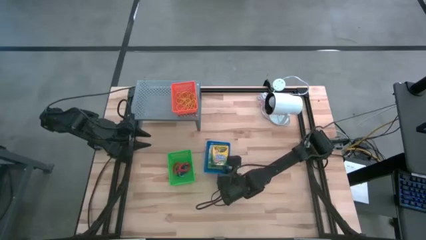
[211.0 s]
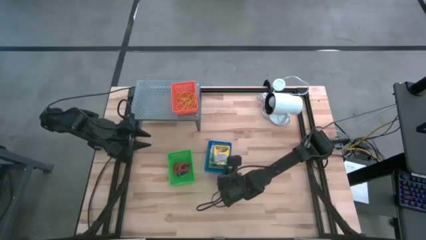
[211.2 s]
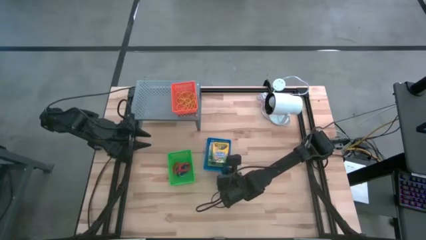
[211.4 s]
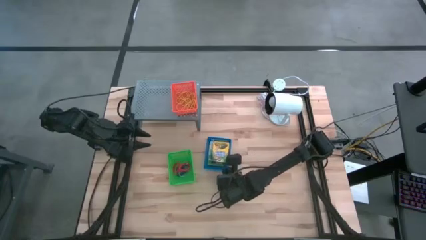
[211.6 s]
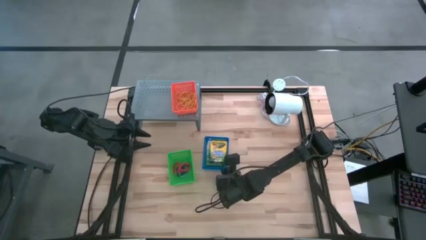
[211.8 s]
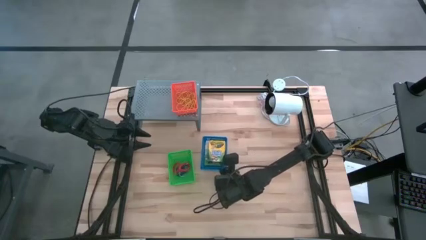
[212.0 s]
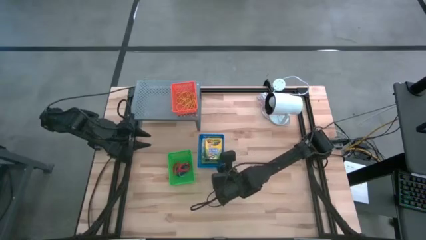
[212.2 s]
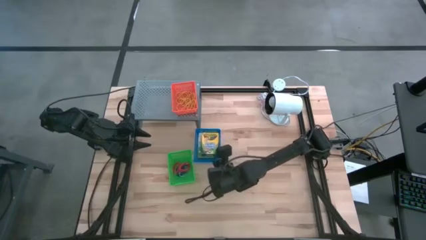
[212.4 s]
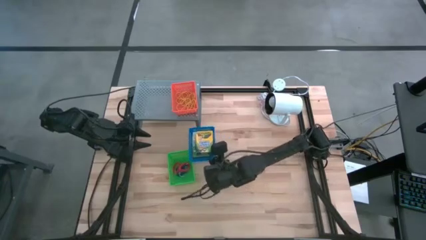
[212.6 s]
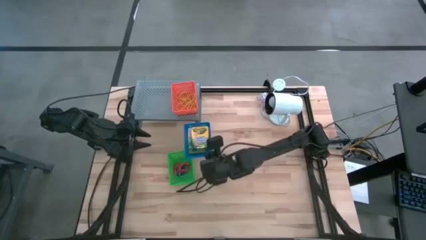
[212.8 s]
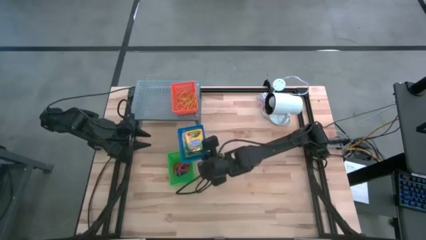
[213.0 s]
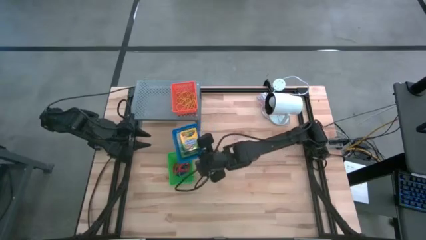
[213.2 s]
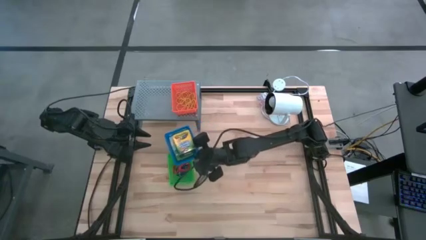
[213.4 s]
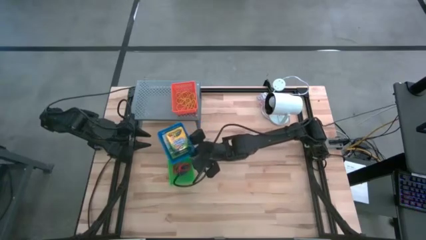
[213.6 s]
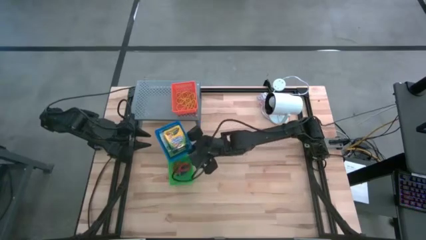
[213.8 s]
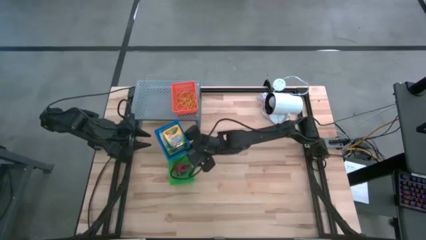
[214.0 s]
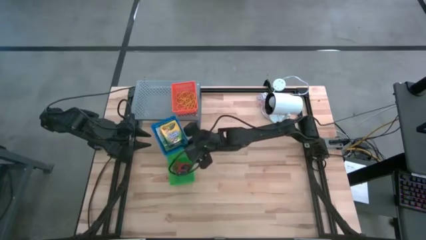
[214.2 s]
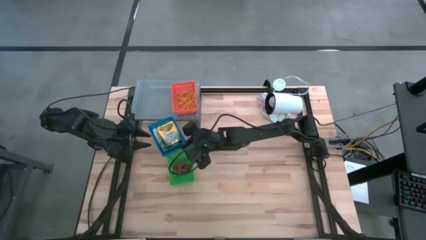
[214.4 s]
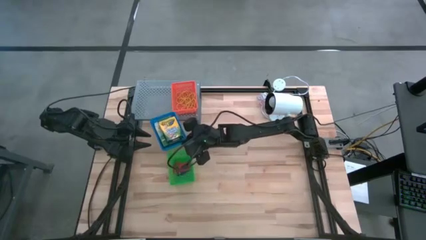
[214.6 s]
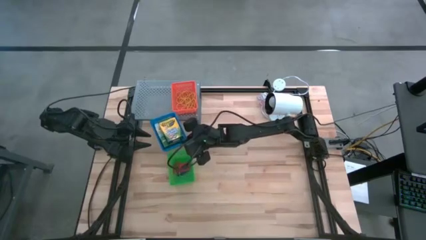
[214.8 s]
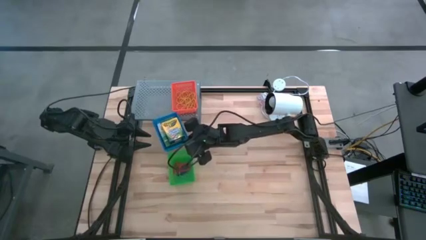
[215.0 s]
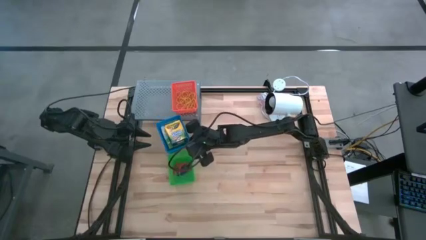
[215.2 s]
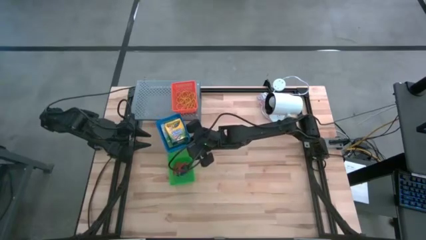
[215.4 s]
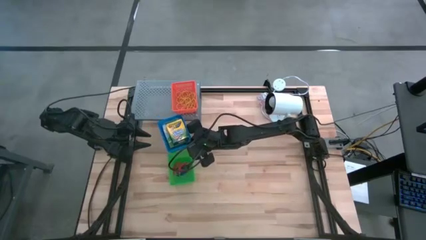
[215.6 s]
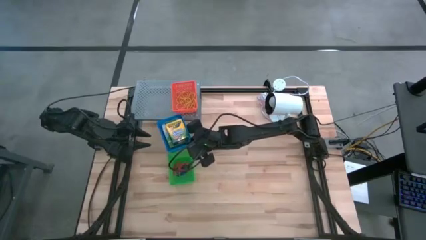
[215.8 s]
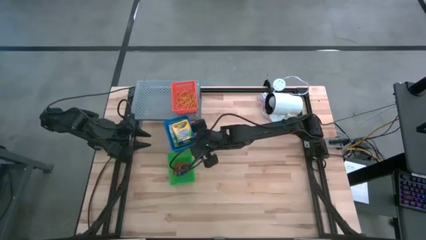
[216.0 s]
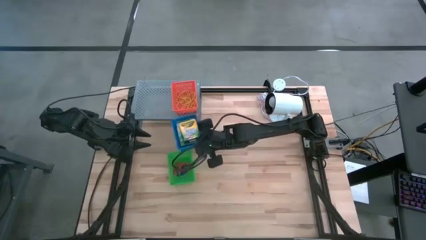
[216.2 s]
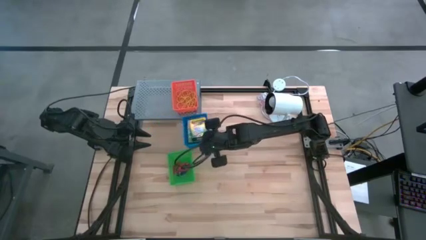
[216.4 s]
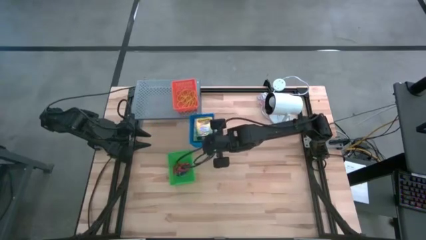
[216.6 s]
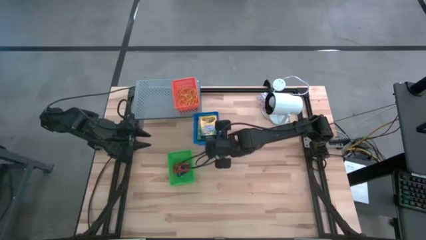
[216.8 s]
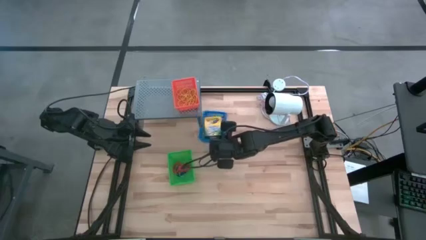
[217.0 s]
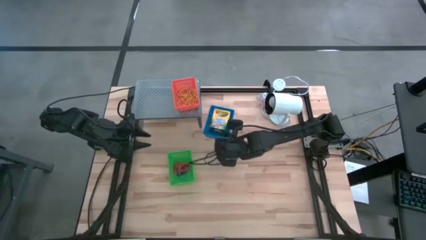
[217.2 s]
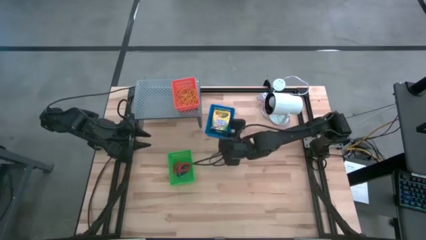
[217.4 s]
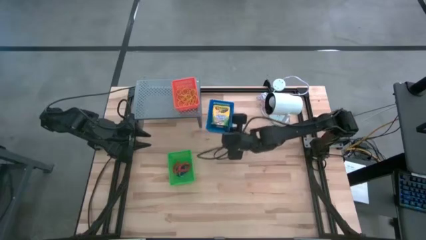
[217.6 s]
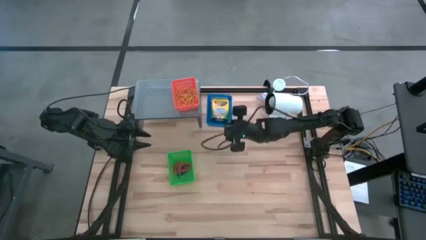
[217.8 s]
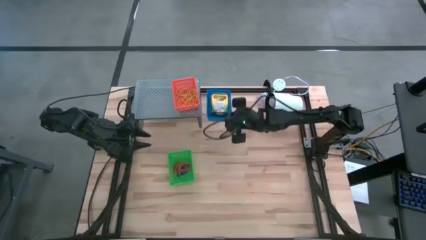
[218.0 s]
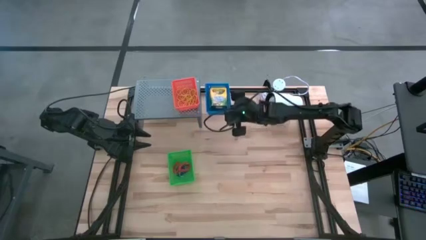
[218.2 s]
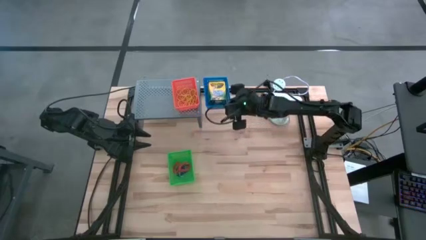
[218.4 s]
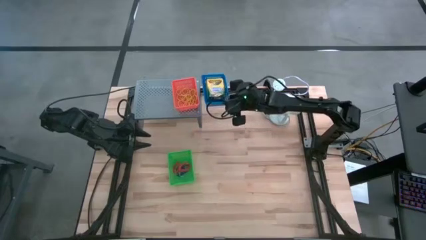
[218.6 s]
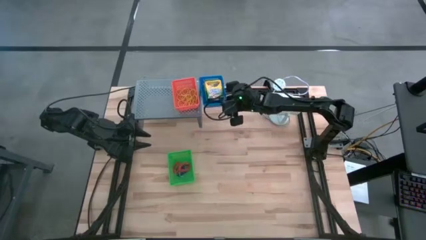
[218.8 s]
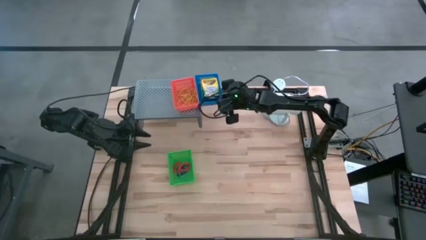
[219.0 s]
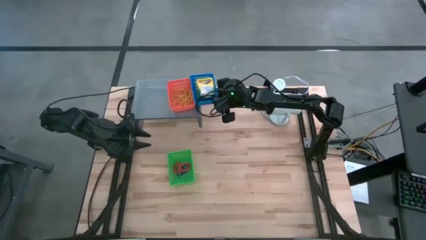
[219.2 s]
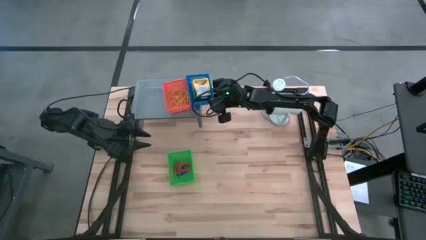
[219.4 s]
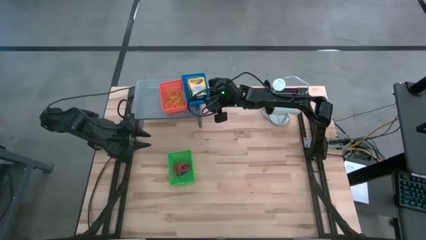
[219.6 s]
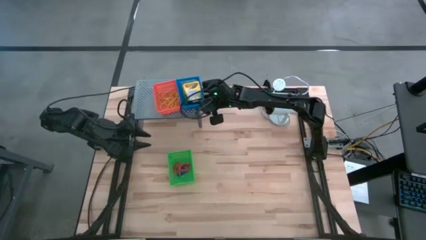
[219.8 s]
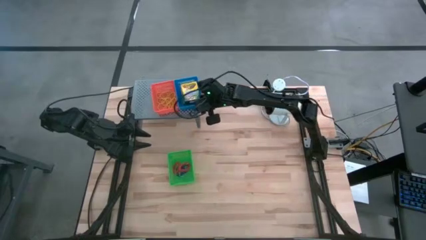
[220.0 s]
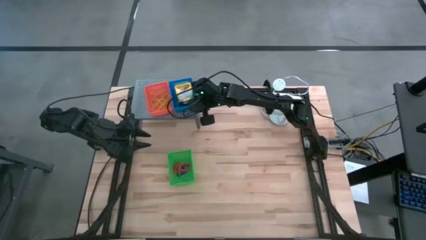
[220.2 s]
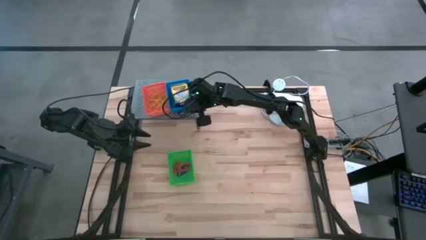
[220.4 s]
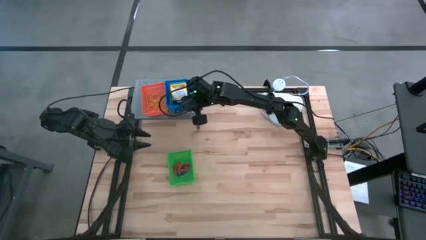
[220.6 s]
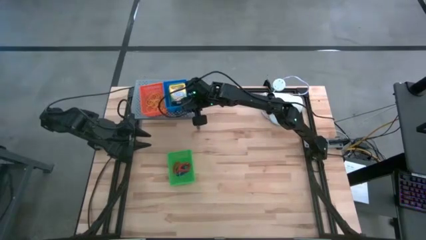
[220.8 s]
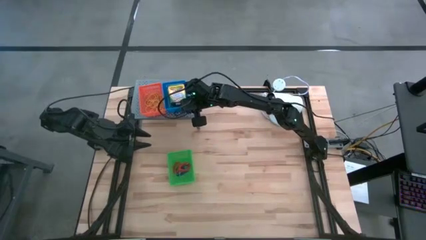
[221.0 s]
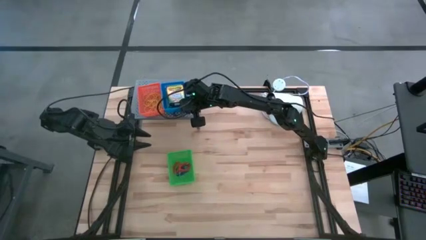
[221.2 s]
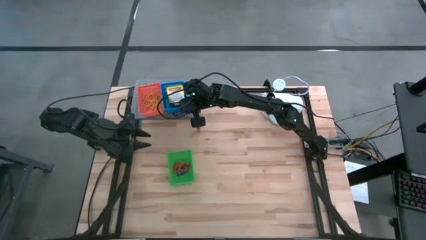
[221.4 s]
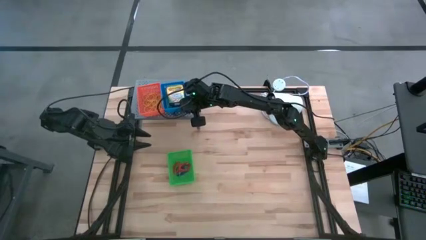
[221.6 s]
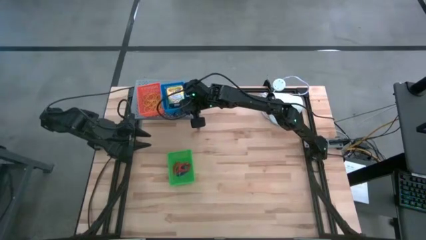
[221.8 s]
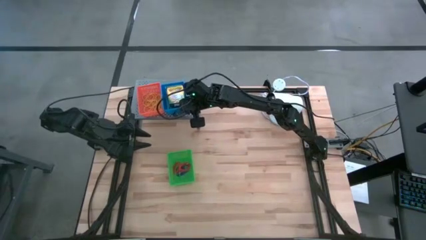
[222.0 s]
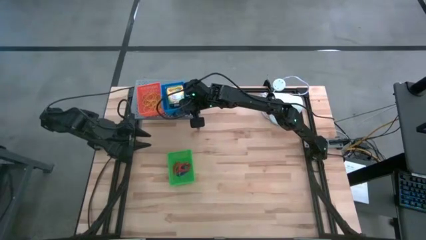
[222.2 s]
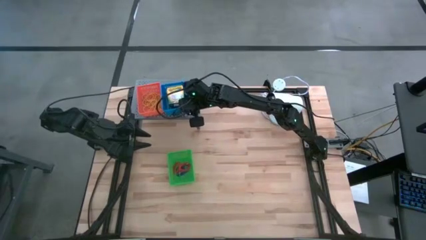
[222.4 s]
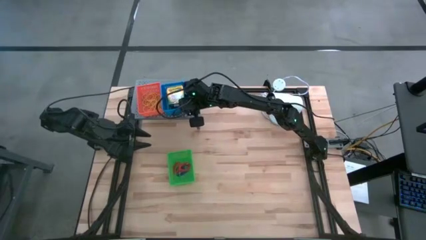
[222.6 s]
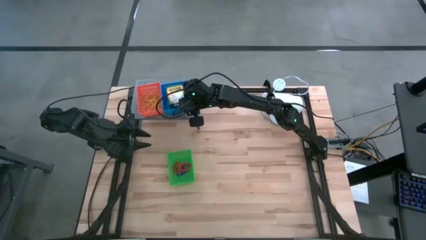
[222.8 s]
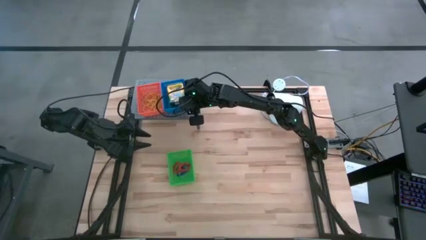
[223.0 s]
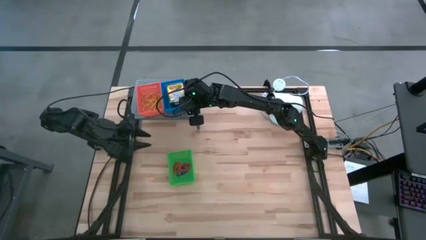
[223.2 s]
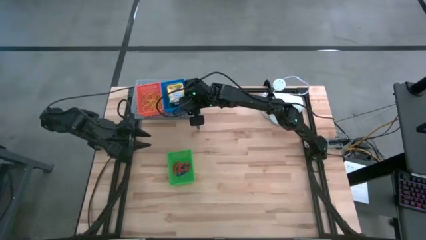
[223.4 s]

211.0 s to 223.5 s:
Task: Pick & Place Office Desk Supplies
Put the blue bin filled with crayon boxes on the shelf

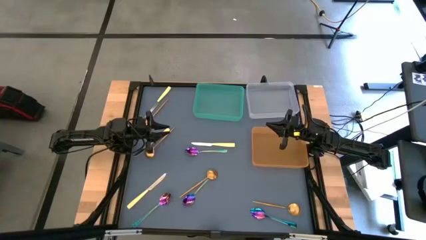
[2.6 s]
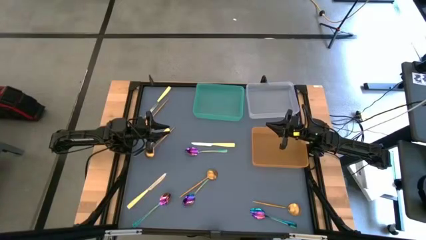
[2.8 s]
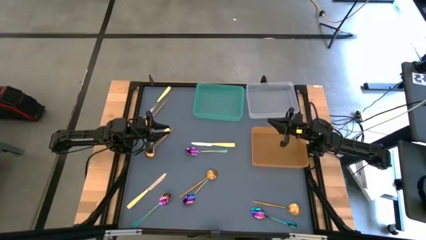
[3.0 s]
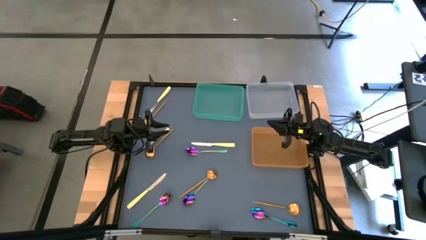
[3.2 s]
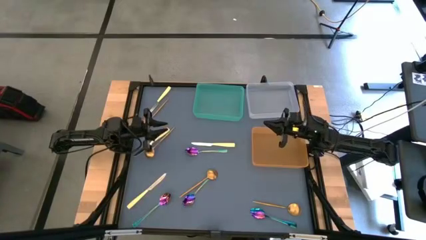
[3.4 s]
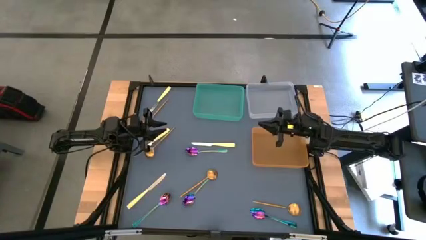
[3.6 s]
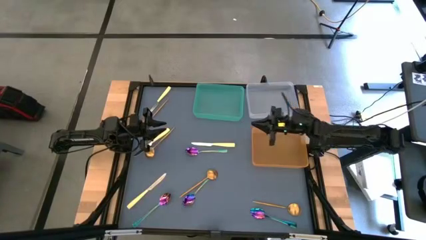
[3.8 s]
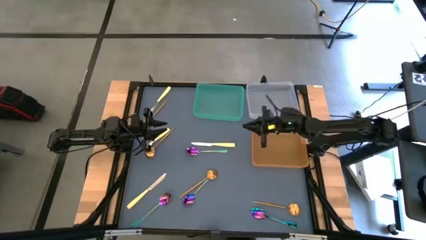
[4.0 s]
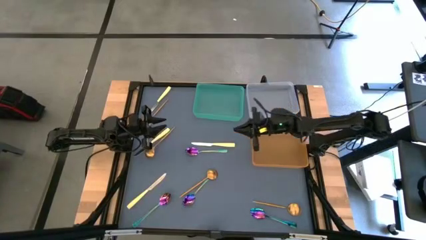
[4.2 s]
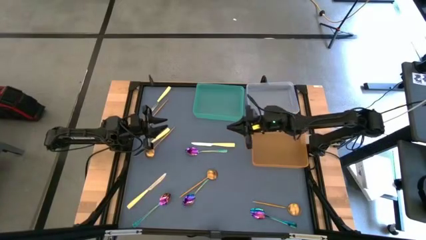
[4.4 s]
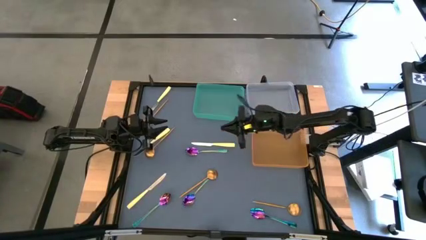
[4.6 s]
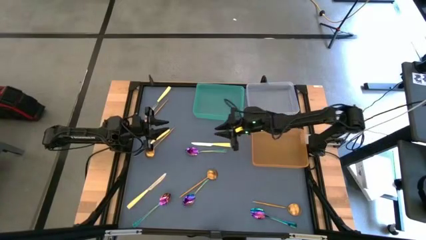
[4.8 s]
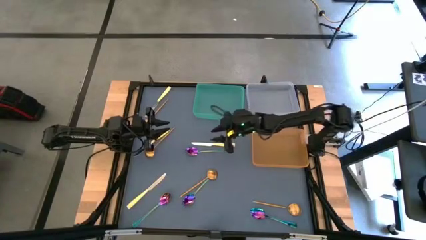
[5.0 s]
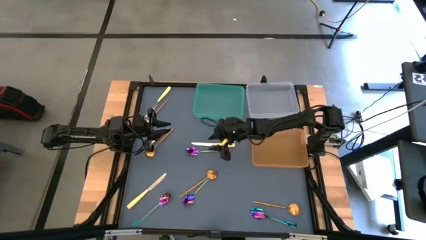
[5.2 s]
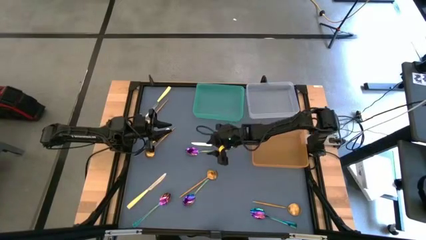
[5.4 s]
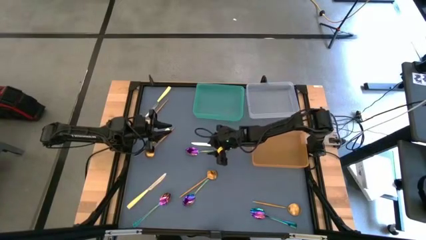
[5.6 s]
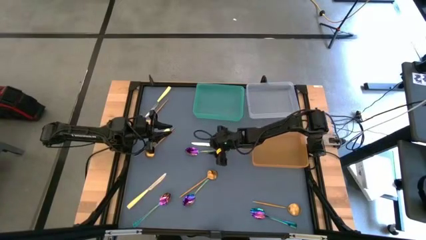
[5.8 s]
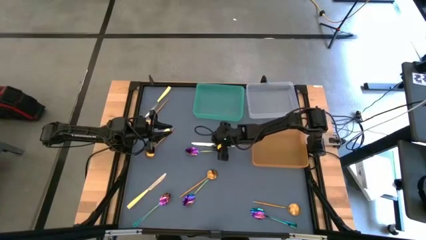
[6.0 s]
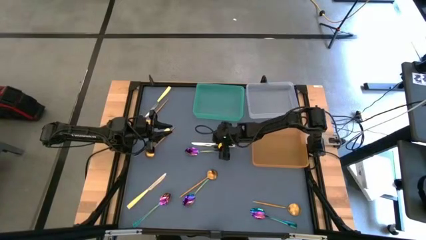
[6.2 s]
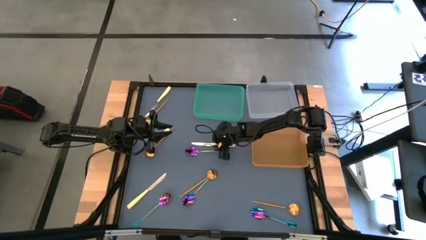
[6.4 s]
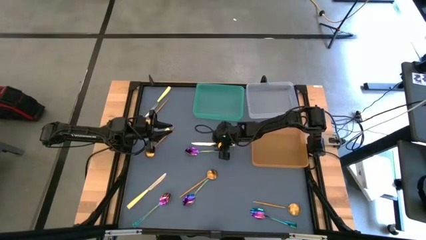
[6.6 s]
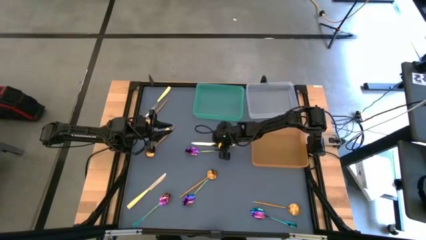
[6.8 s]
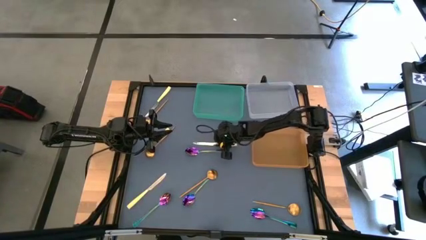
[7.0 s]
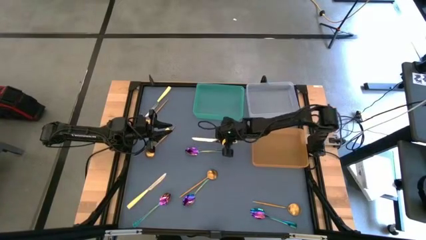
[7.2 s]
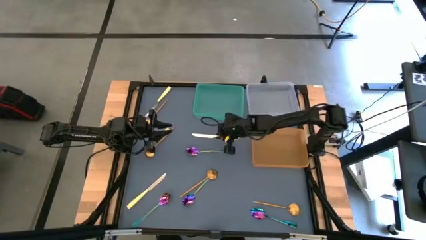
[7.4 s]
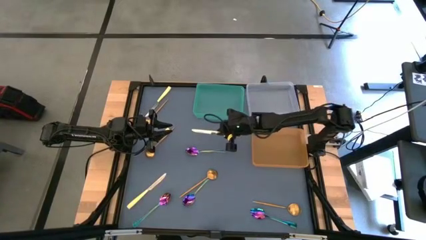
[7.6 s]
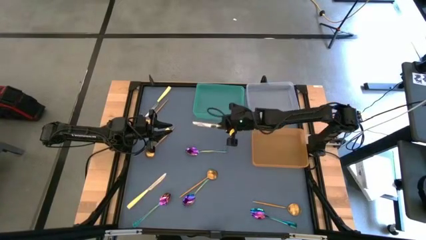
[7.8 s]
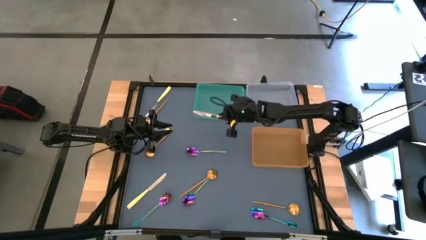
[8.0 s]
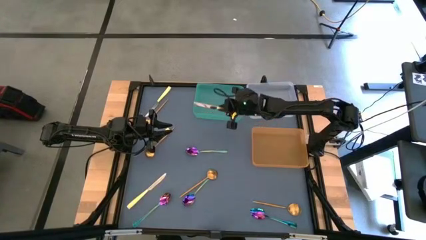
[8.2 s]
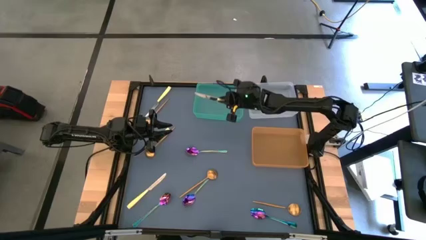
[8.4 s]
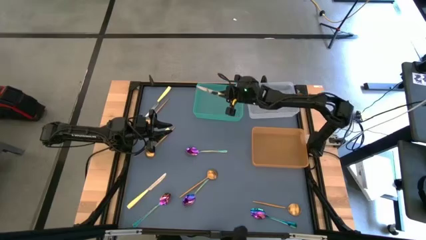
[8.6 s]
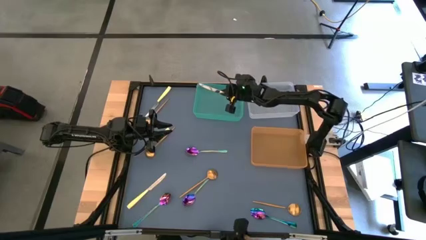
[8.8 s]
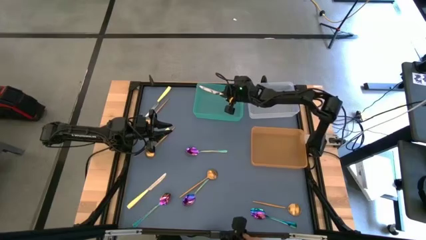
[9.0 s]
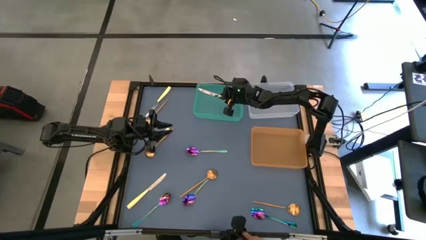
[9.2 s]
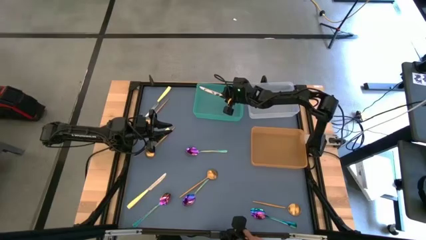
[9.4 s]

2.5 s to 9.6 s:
Task: Sort silverware by color (type)
Put the yellow table knife into the green bin
